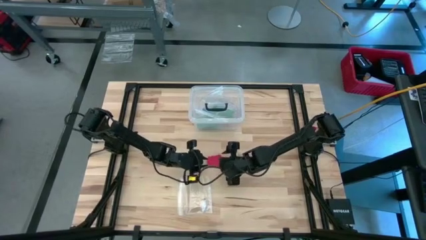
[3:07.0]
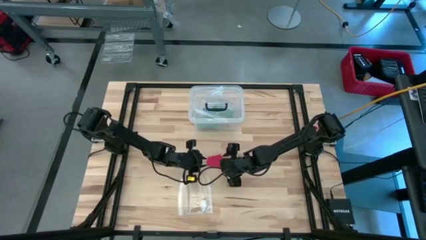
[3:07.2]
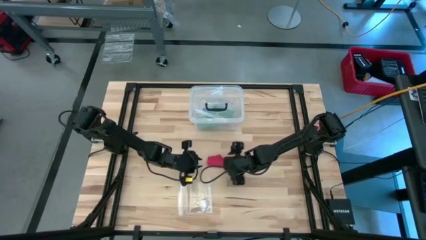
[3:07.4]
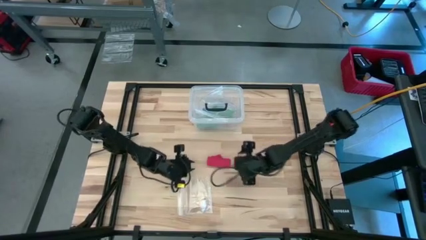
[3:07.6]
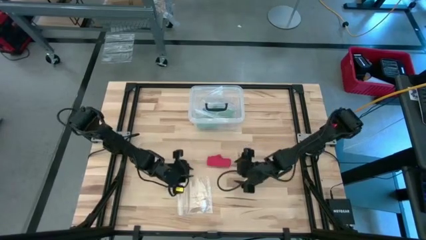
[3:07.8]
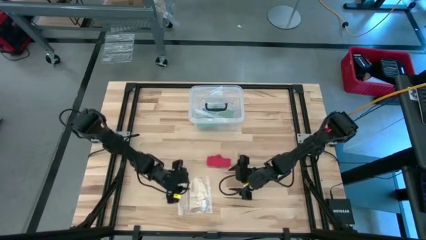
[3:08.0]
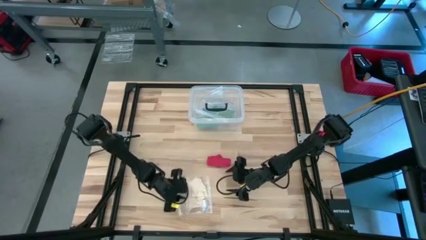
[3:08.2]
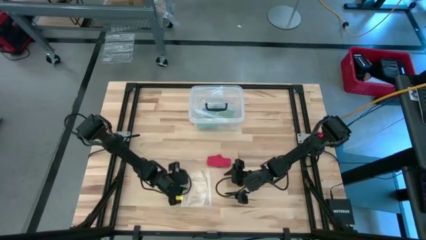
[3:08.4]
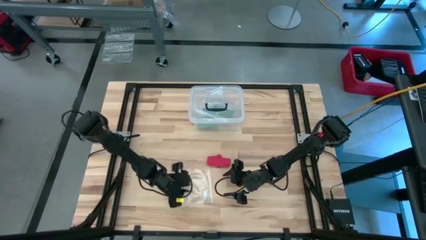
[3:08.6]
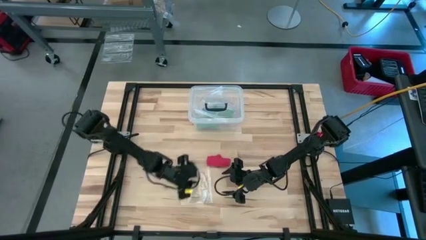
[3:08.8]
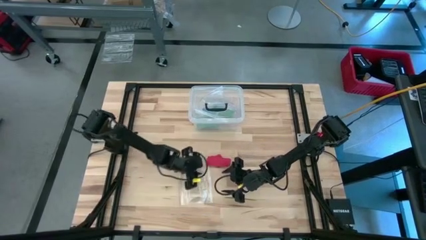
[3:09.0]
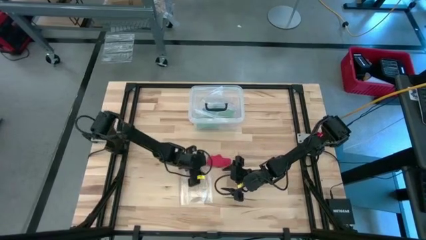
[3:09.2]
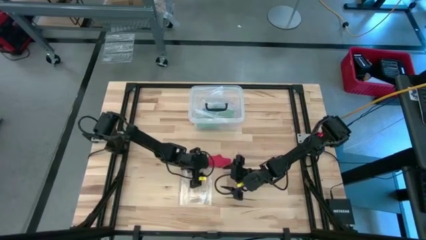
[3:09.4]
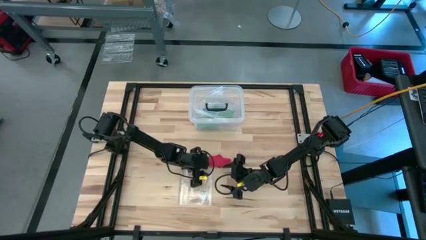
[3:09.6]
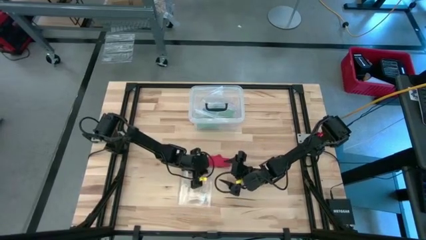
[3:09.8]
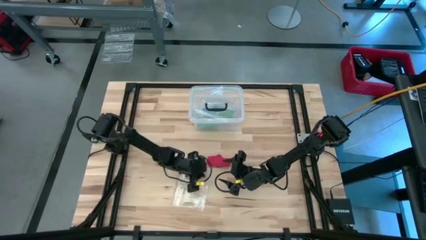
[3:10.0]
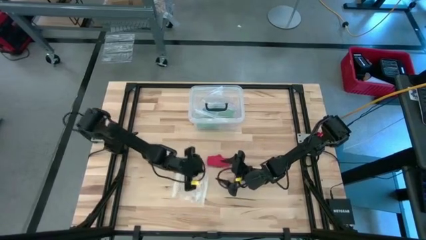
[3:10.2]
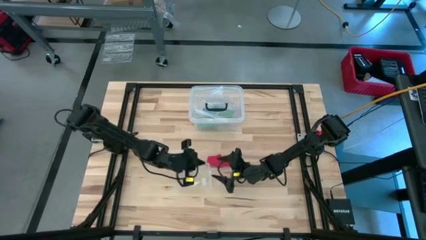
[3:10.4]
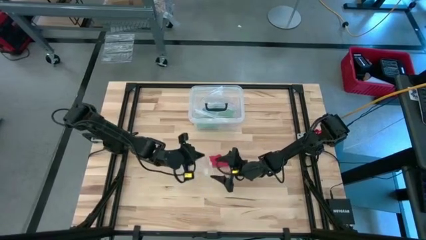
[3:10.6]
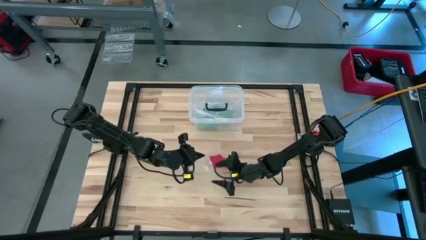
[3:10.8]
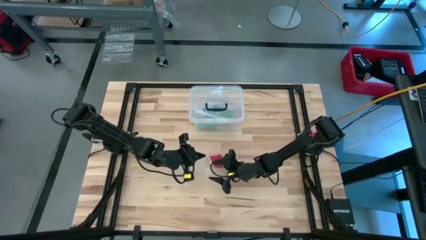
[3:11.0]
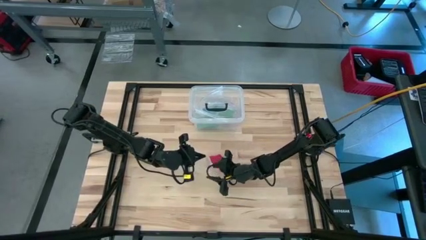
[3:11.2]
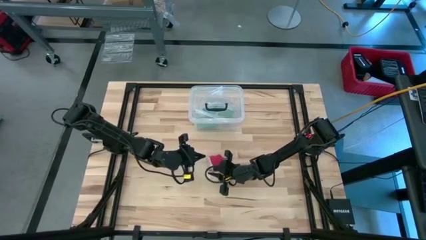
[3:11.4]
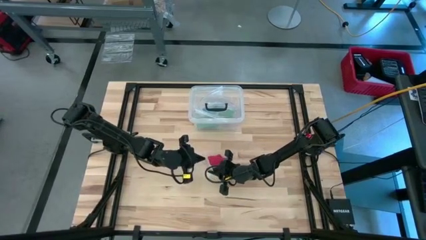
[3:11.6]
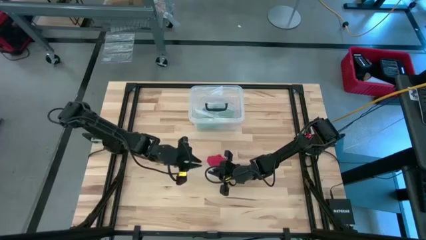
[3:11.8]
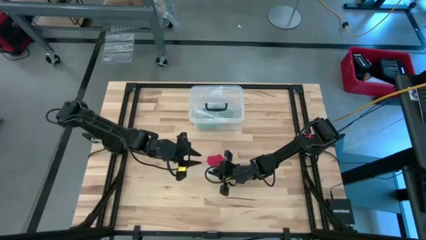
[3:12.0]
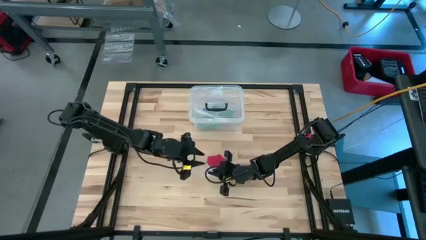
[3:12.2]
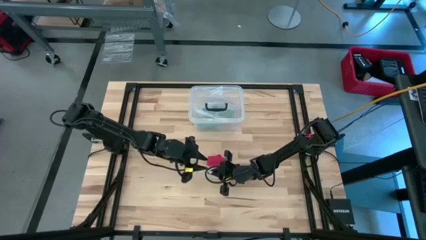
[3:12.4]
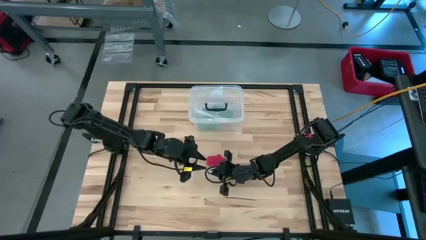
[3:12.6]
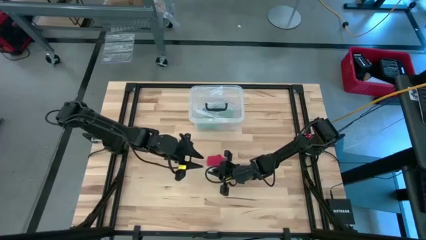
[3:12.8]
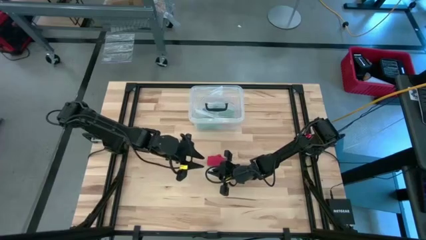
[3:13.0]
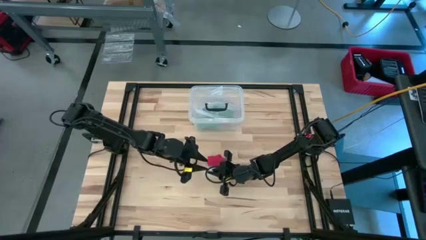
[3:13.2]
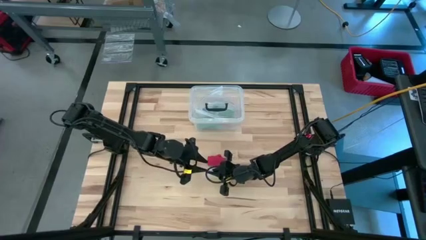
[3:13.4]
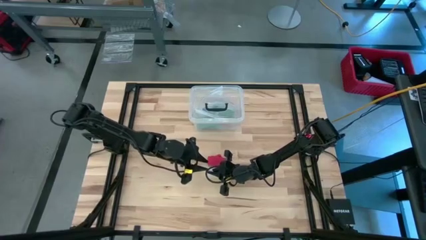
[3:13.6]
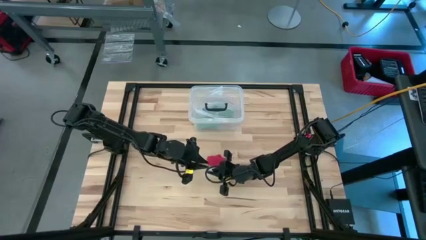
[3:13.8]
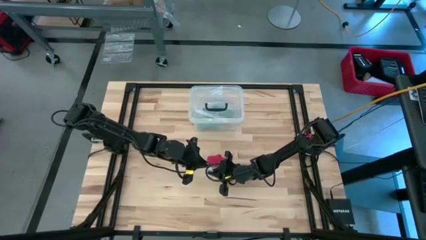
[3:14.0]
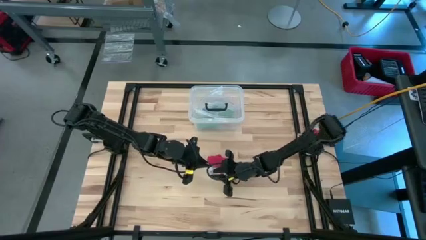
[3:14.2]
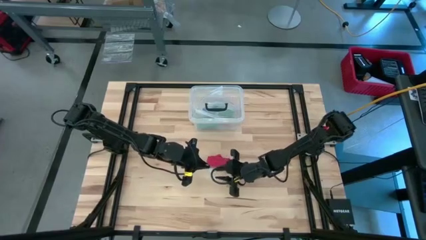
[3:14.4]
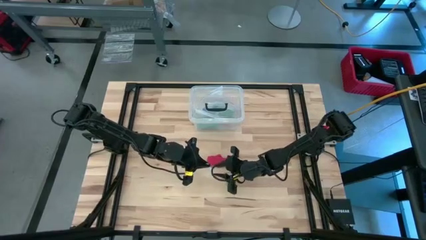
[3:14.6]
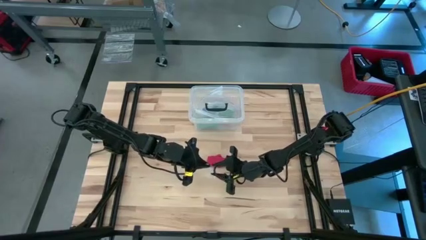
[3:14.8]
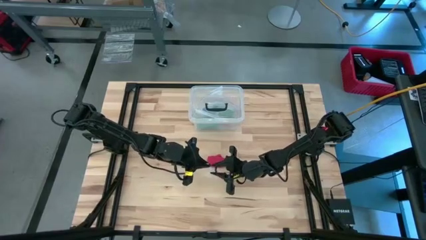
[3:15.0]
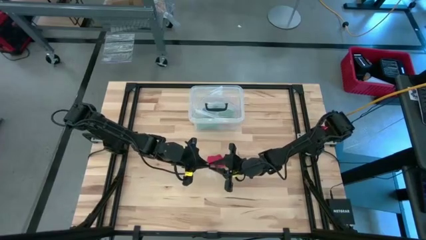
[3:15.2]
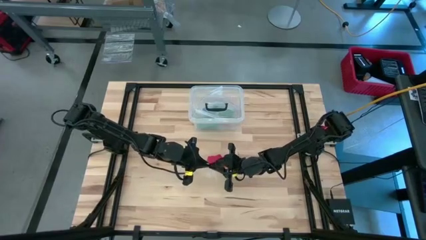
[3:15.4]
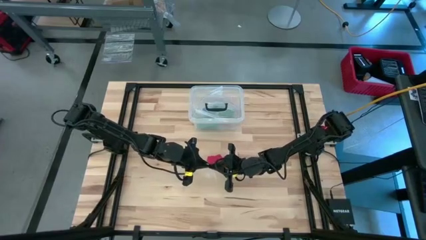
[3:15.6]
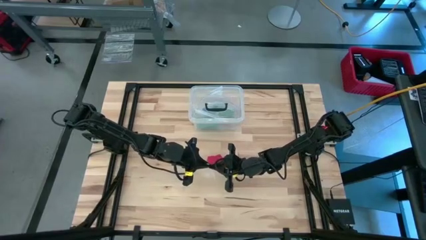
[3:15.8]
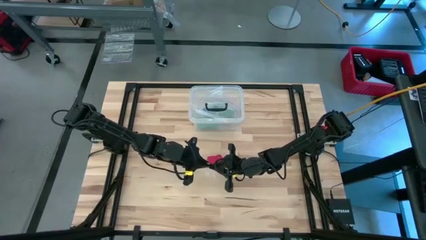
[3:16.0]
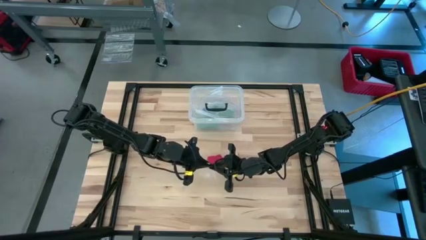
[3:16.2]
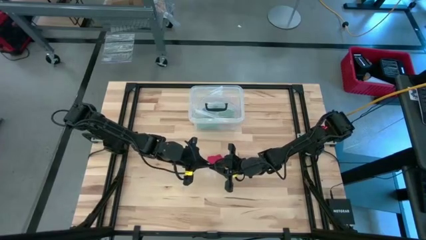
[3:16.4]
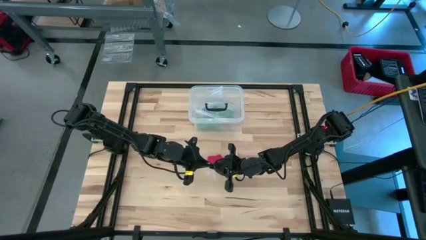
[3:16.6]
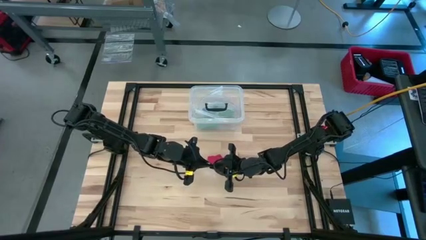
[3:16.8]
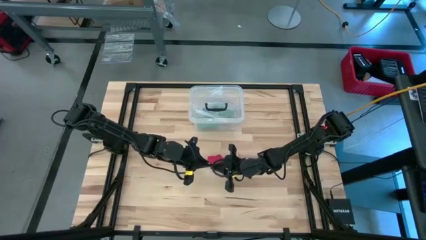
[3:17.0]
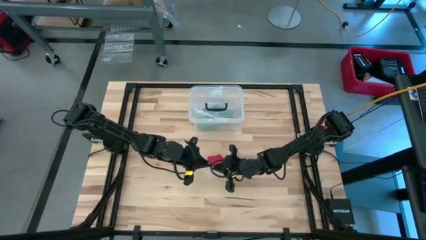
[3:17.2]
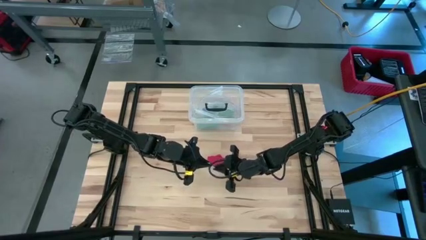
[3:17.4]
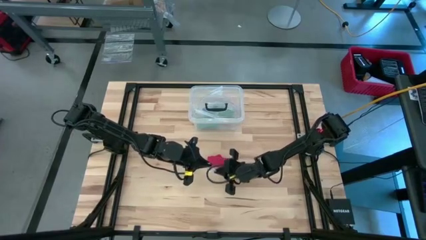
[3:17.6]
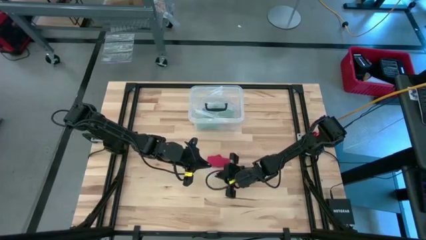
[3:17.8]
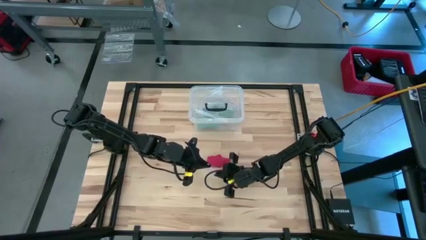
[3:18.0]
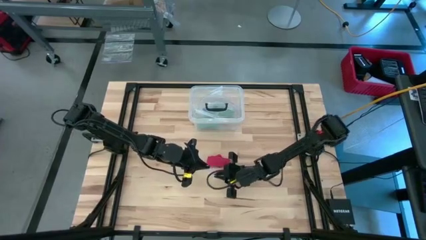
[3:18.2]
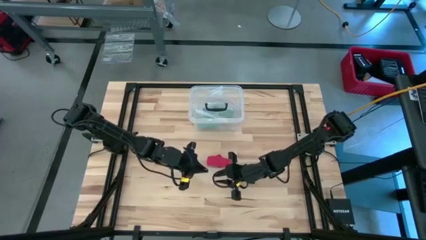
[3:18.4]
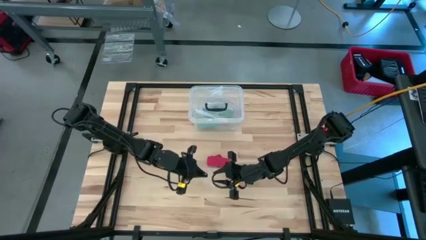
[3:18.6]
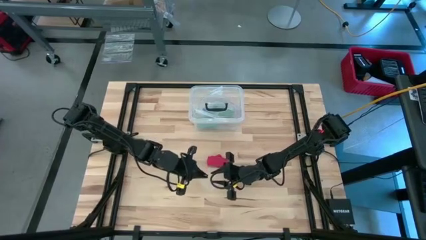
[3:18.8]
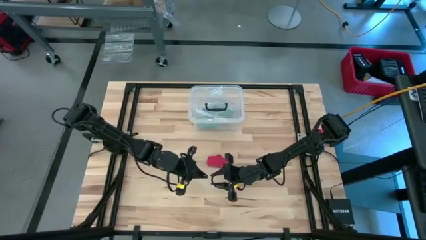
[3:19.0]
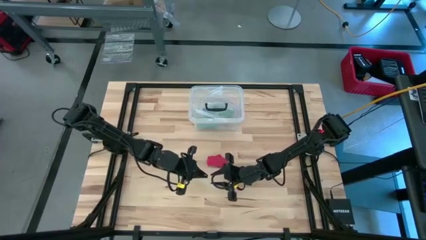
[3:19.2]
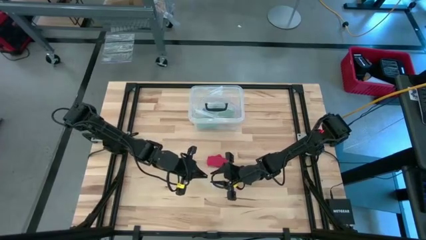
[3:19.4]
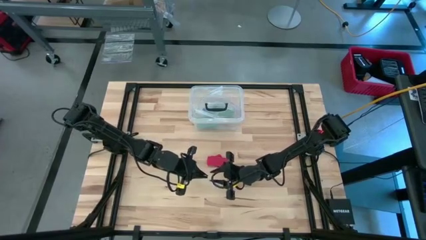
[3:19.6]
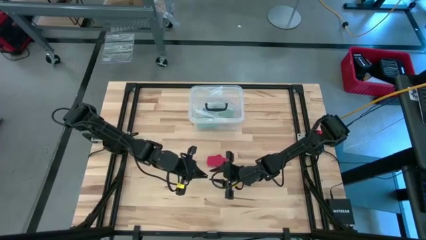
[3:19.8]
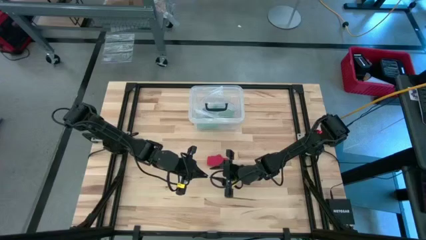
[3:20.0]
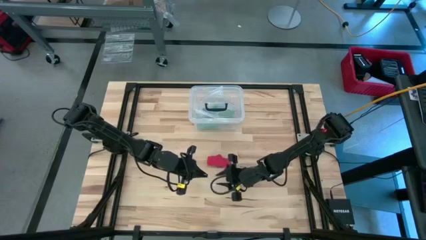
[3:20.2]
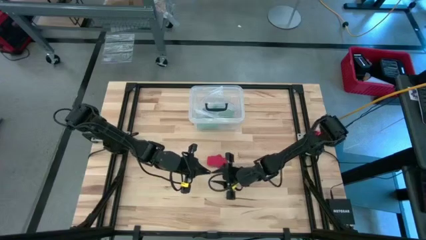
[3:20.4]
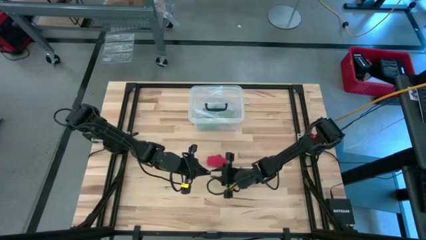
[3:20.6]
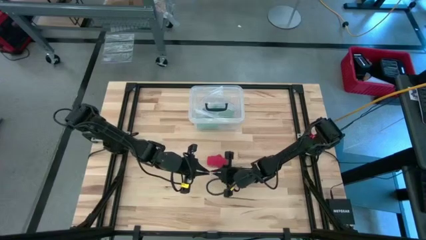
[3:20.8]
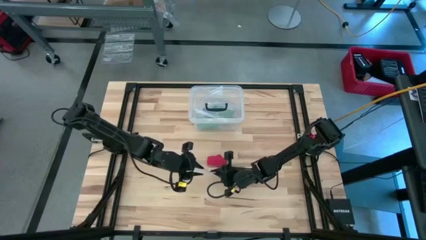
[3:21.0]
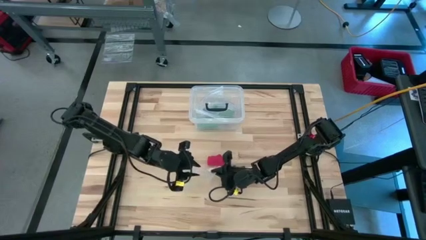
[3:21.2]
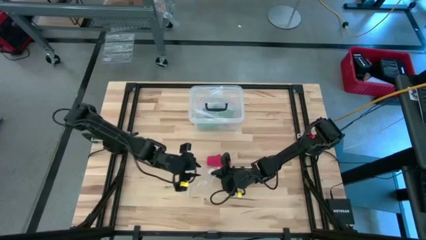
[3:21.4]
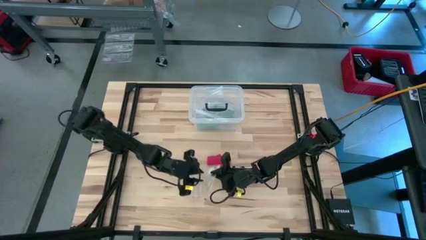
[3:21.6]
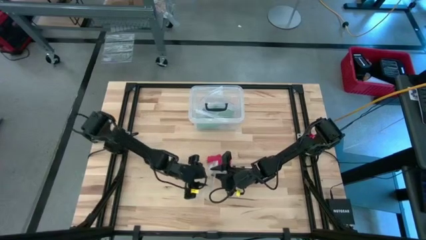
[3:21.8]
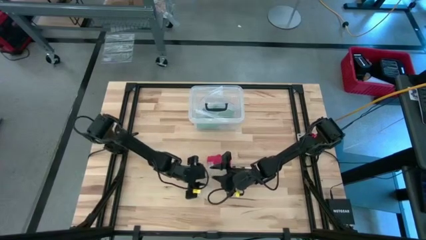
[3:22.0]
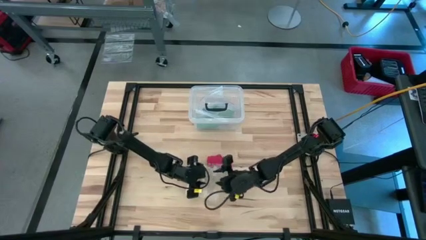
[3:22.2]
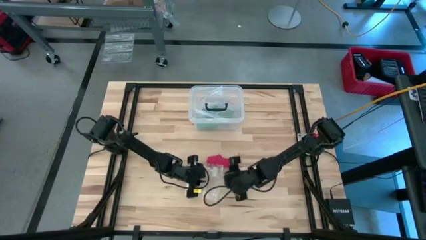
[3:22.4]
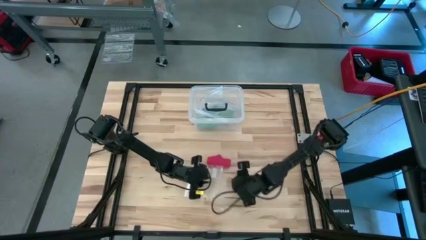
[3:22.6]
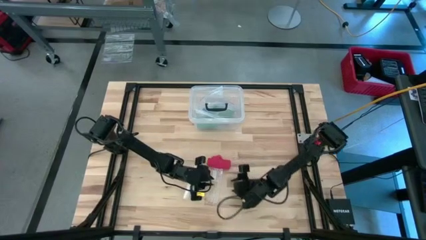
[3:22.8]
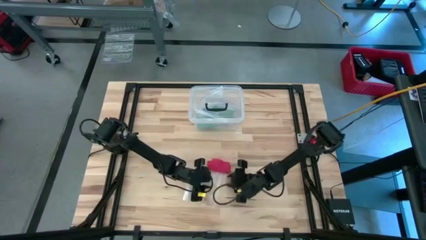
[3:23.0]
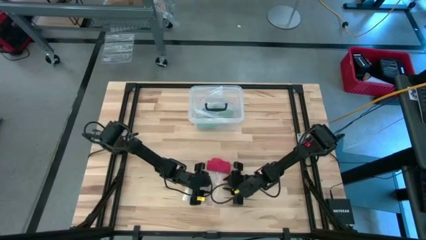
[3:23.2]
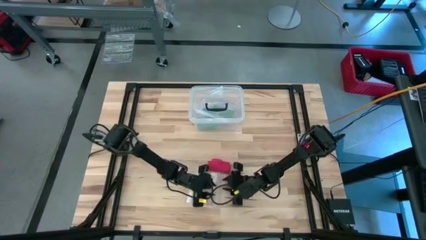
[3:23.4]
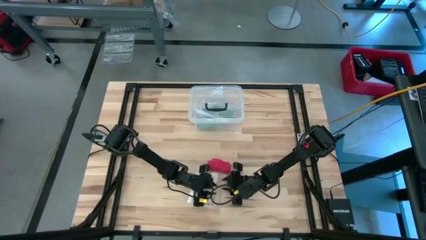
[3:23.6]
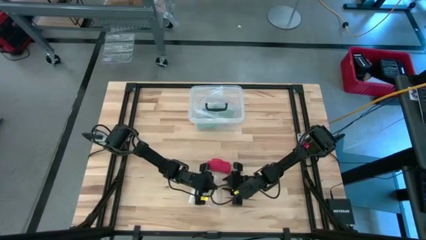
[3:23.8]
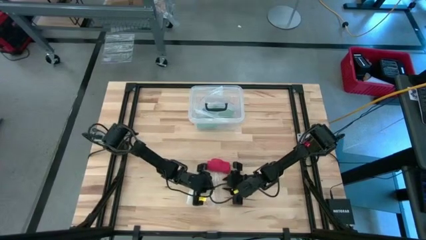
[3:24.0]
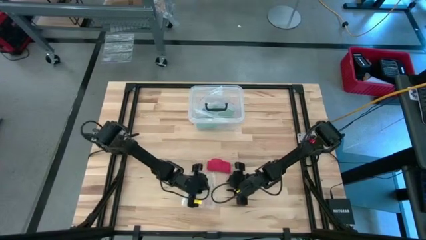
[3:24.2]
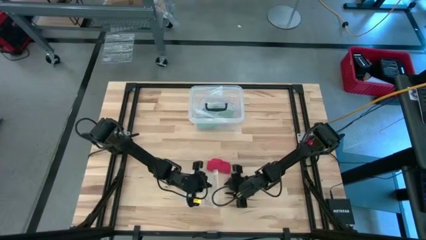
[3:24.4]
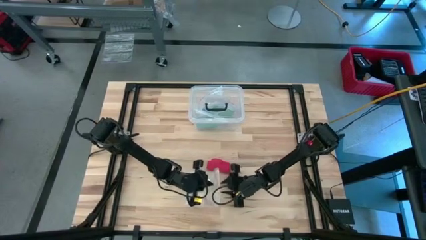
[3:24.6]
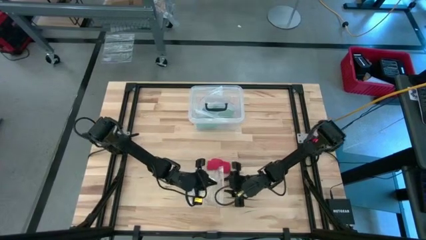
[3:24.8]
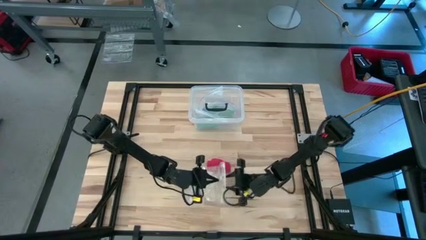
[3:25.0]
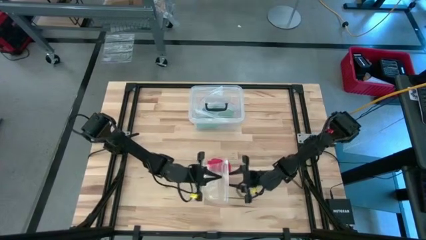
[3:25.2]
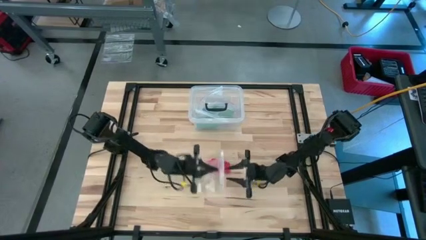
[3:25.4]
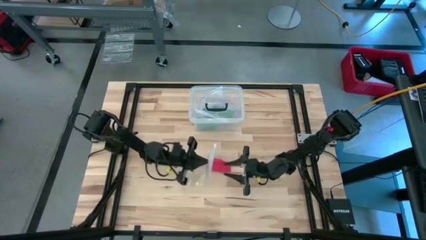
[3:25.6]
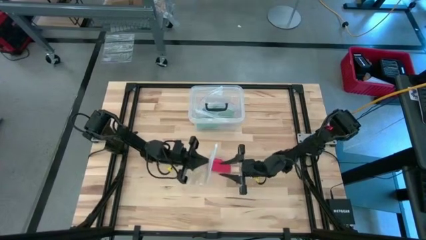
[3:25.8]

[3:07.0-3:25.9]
Task: Roll bandage
Open the transparent zip bag
